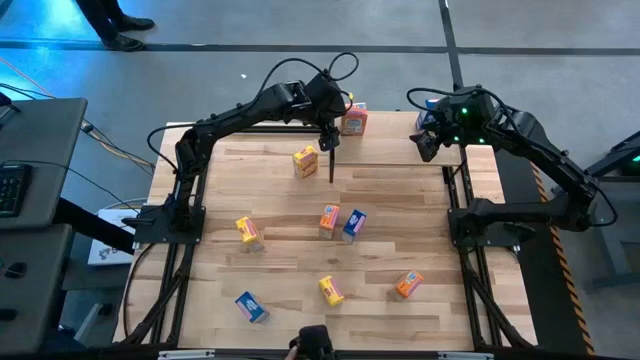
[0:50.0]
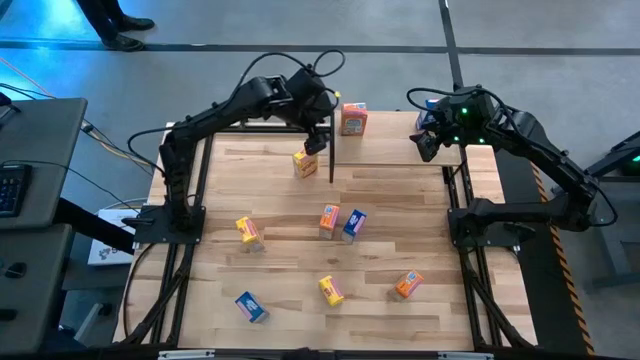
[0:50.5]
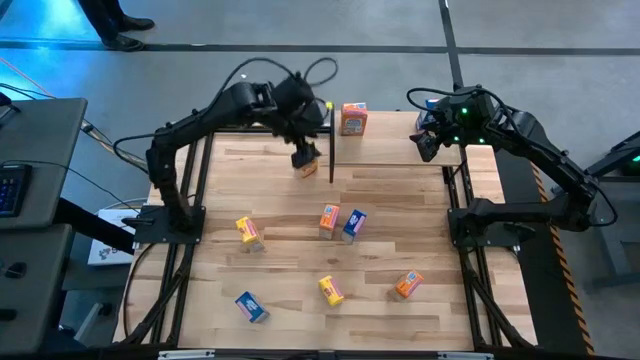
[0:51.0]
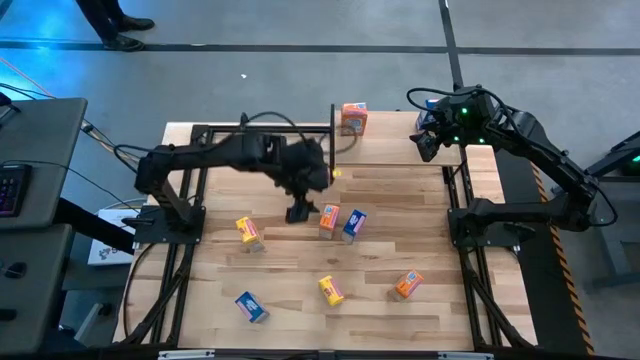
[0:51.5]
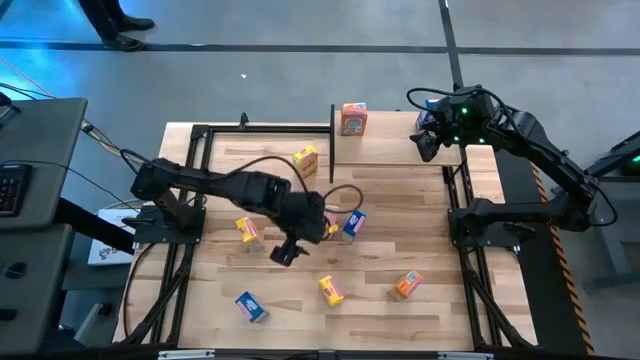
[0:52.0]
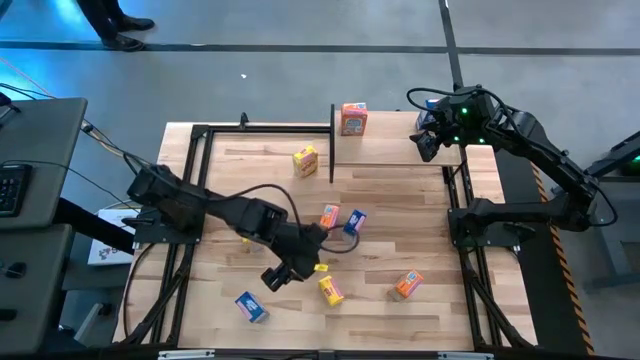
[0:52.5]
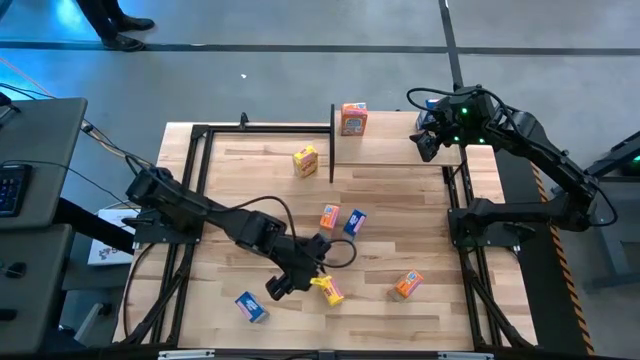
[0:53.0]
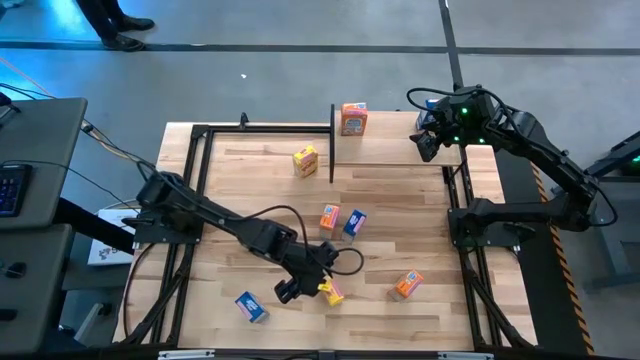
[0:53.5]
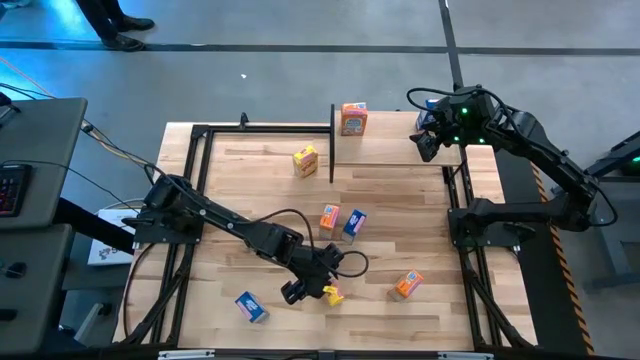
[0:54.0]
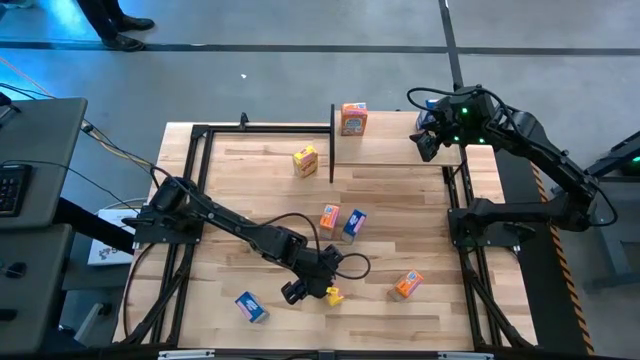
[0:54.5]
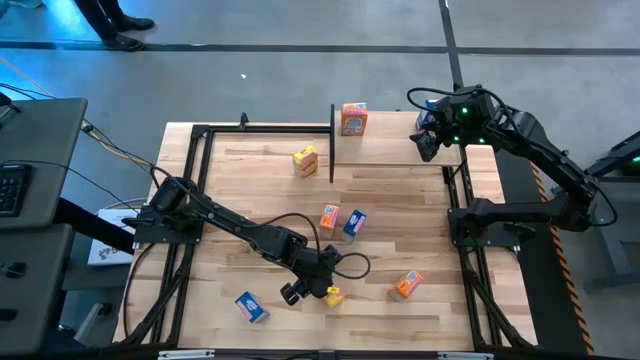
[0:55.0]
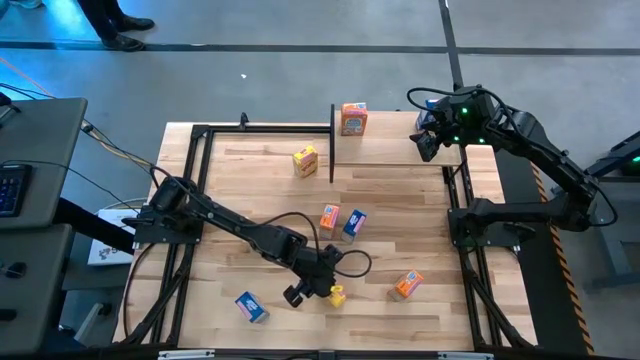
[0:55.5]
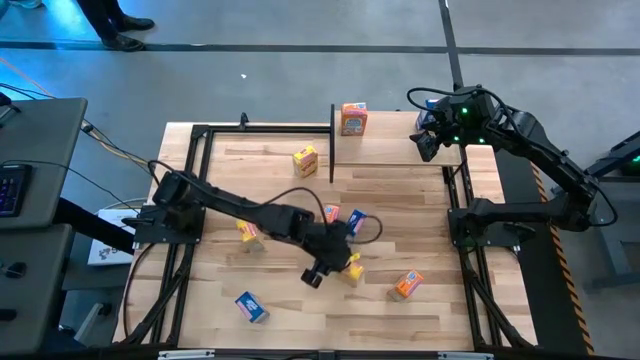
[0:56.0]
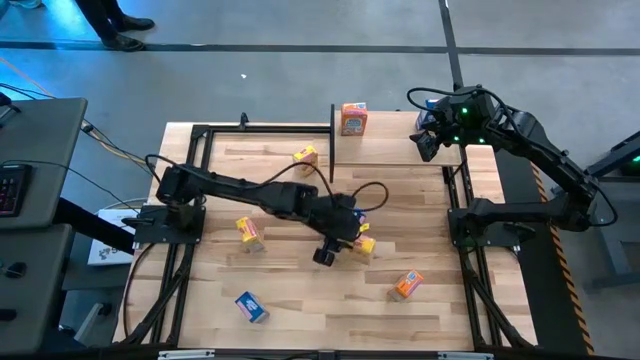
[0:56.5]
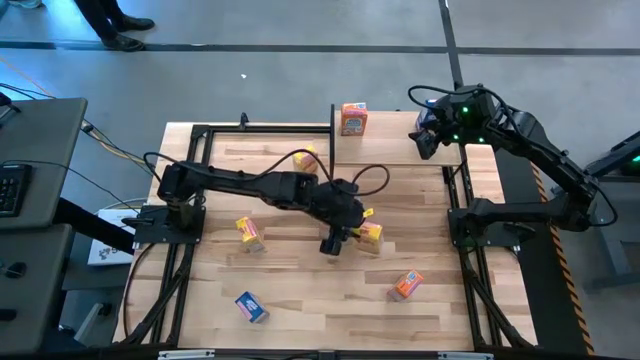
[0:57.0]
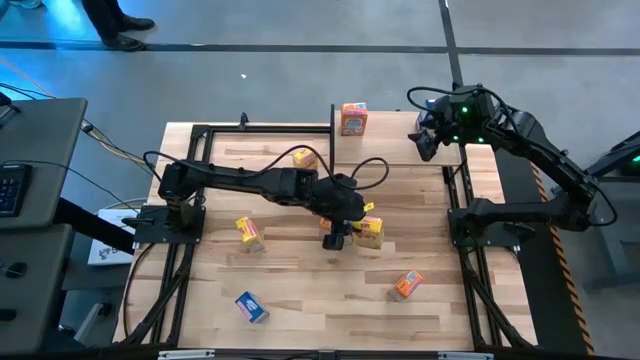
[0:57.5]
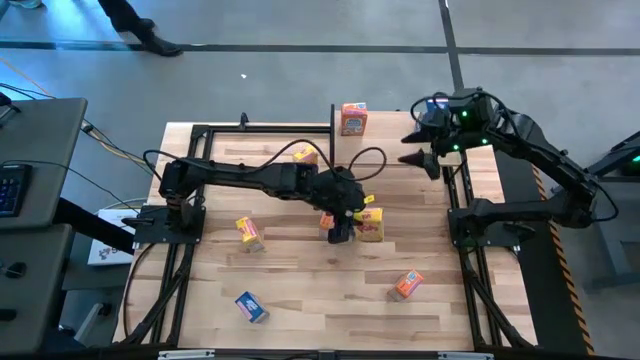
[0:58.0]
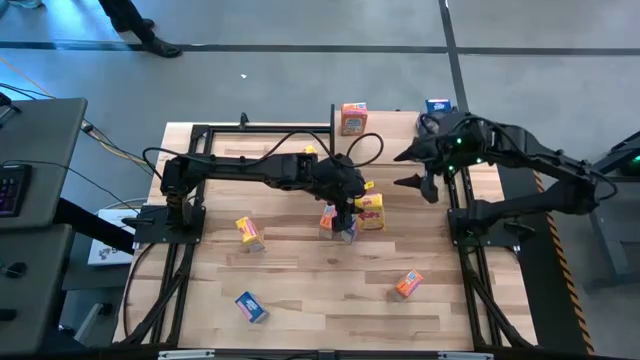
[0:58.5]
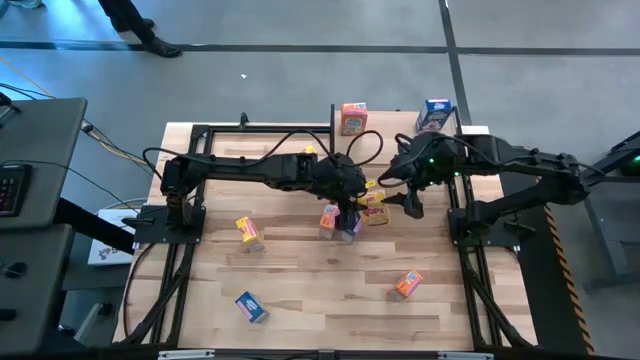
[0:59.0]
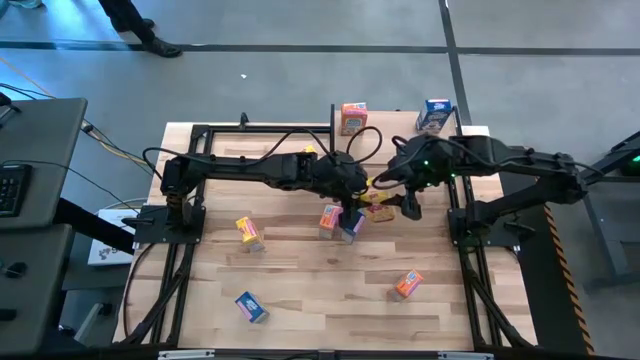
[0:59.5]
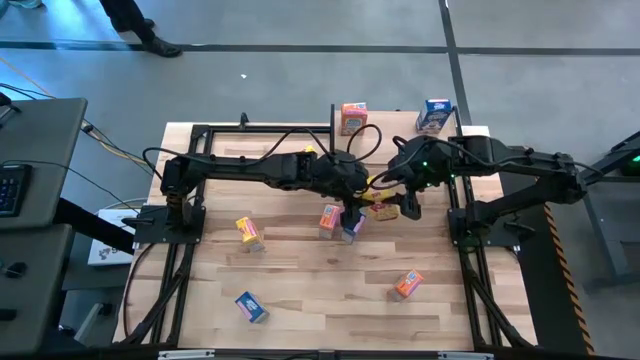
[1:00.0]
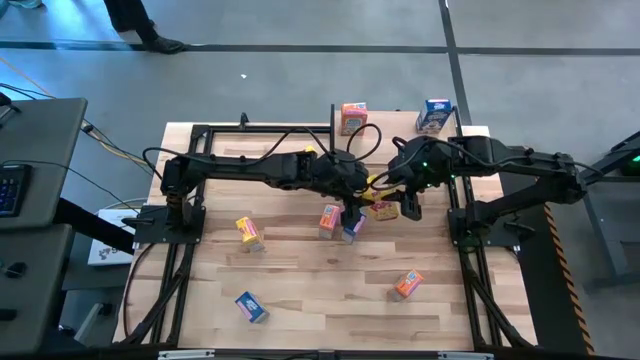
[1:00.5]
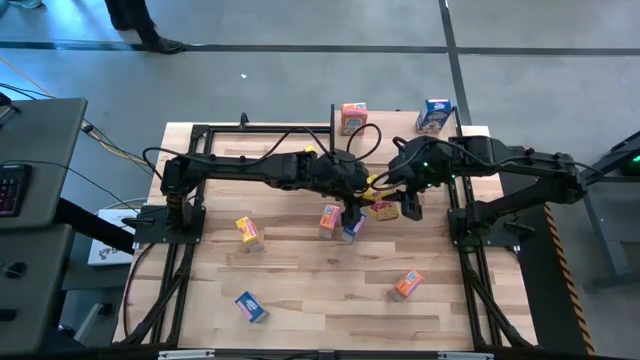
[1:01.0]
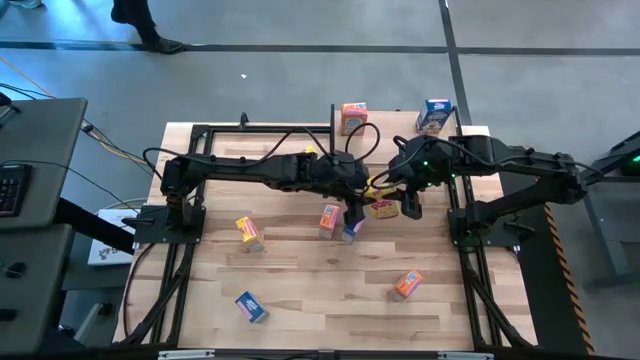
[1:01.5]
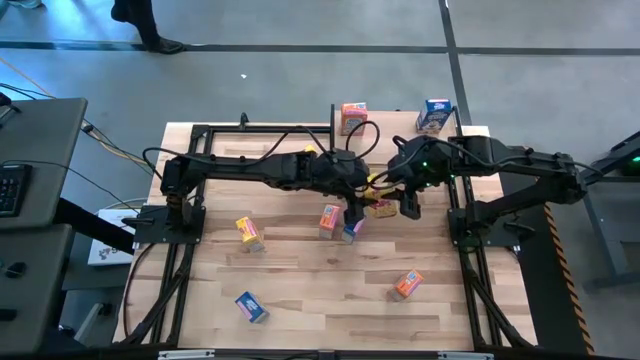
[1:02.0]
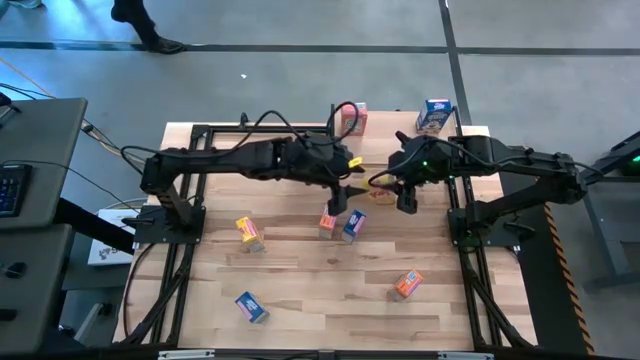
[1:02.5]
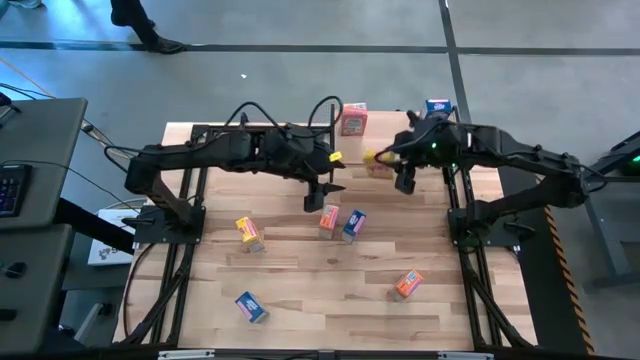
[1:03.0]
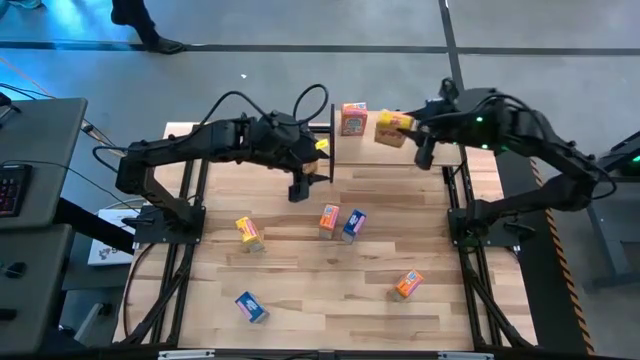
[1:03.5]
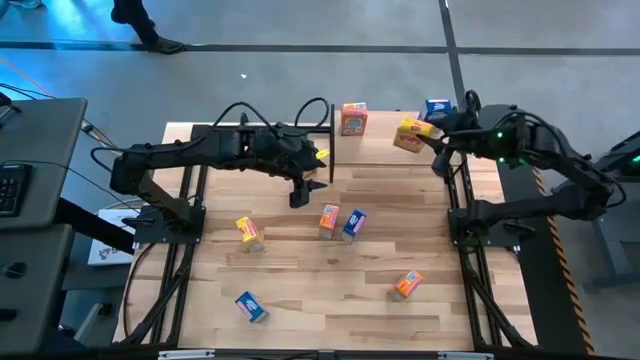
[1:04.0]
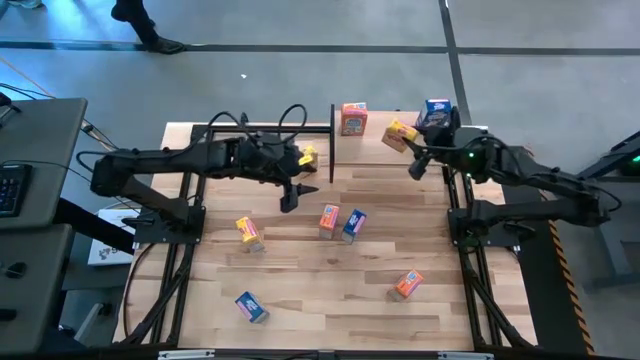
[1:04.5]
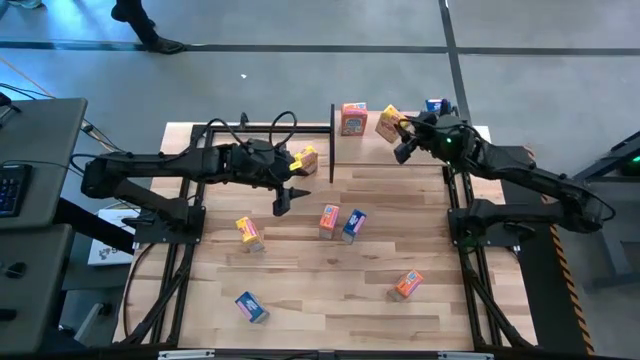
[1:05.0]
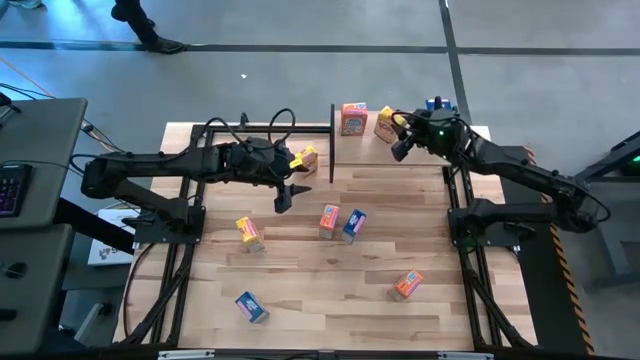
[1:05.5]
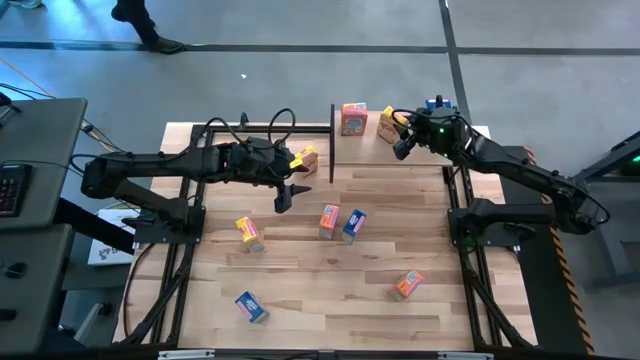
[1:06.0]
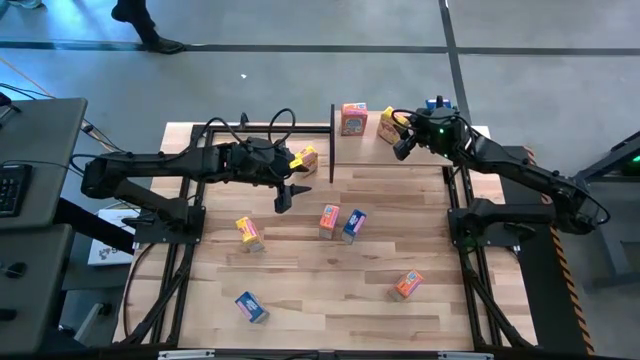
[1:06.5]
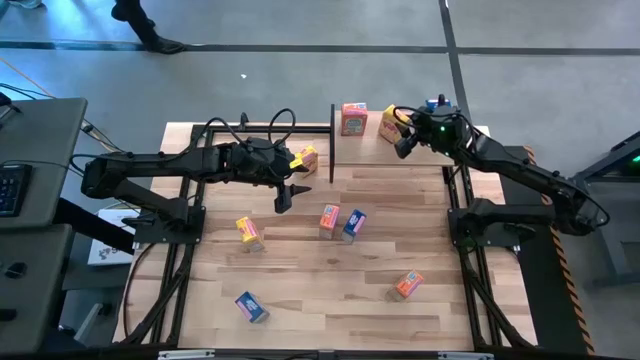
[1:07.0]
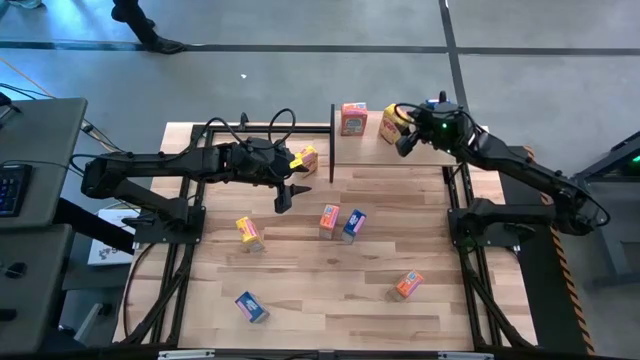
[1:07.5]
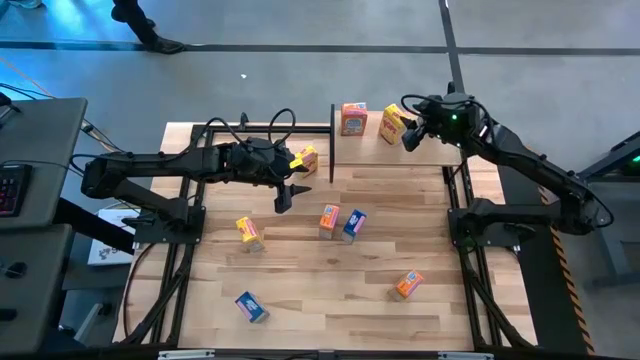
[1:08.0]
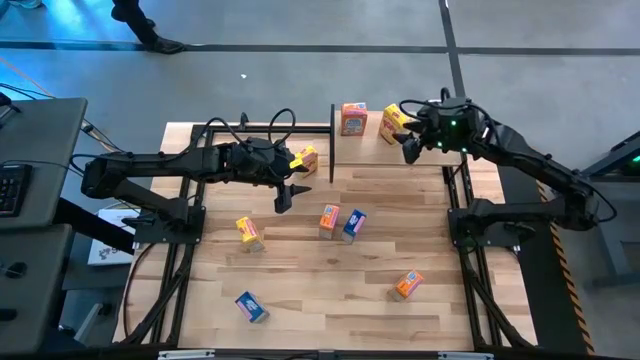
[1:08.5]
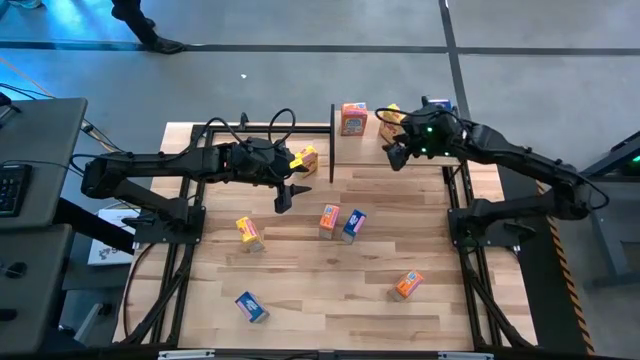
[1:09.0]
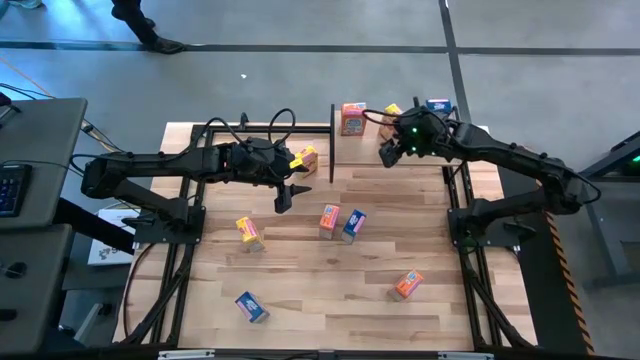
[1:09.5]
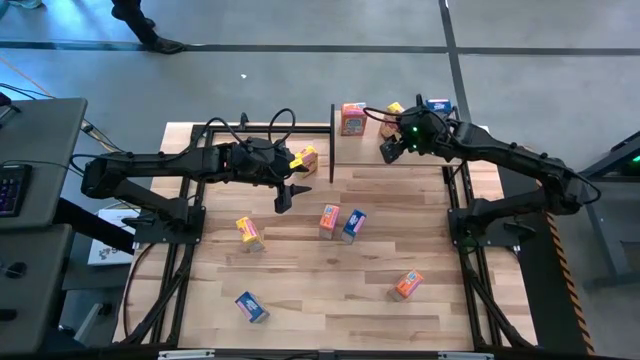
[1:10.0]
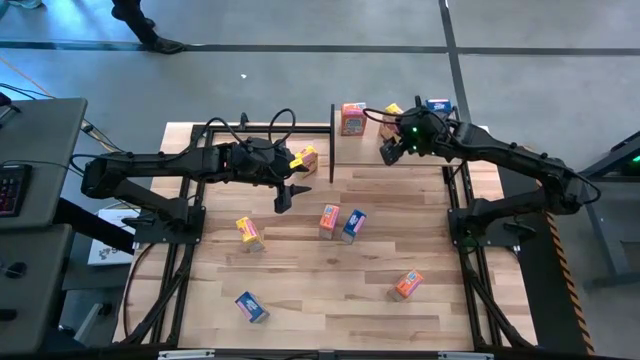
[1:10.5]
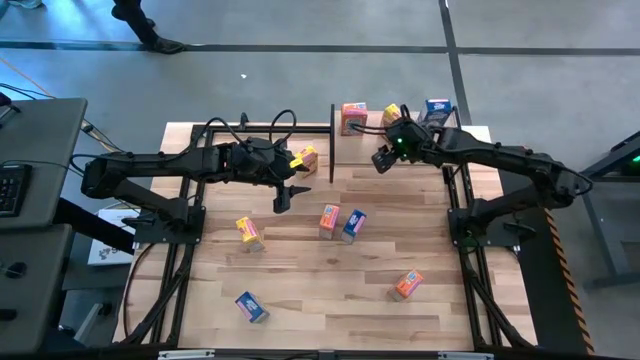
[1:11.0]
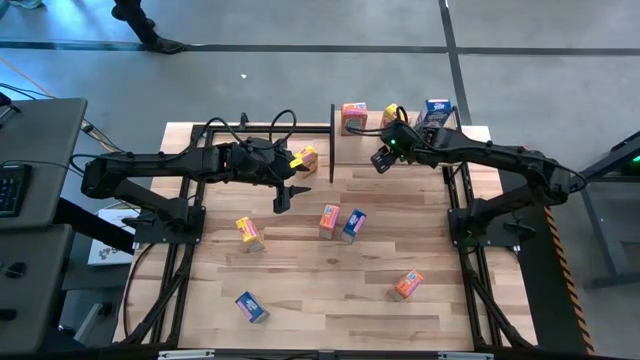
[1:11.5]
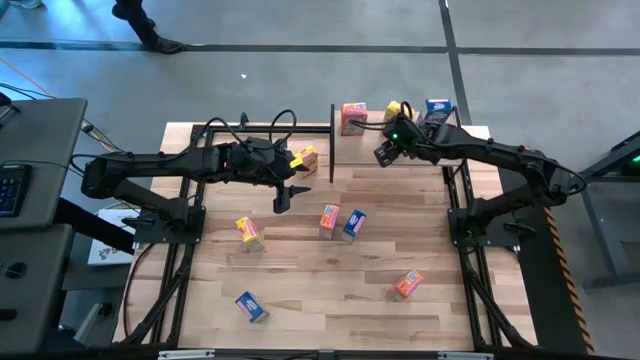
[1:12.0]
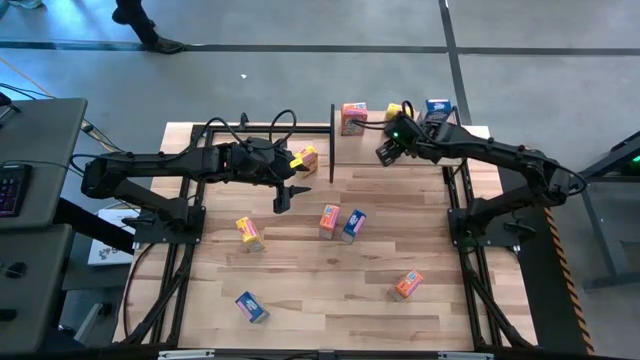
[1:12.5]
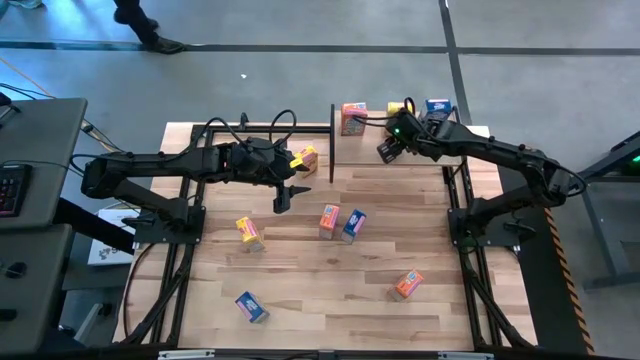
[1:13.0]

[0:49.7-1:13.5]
Task: Stack cereal on shelf
Put the bottom yellow cereal box on the shelf
